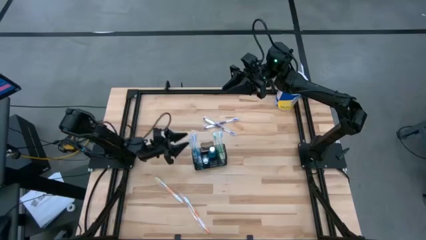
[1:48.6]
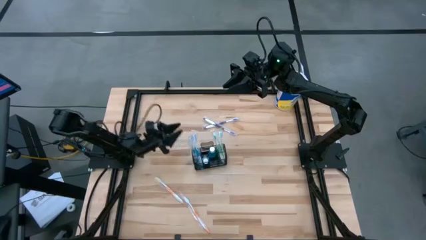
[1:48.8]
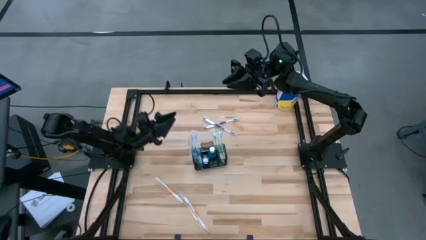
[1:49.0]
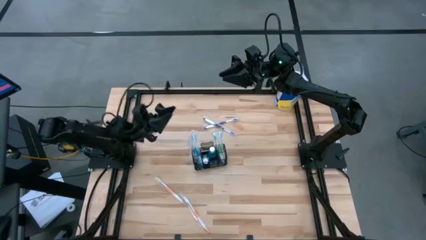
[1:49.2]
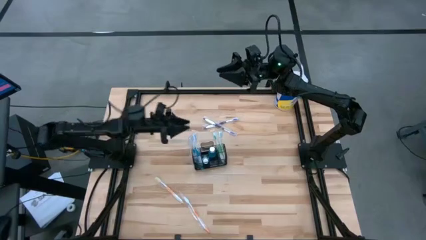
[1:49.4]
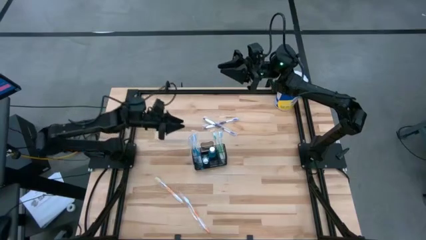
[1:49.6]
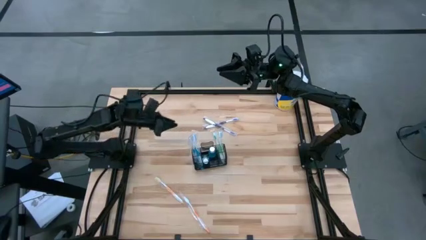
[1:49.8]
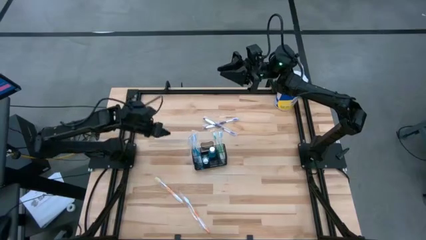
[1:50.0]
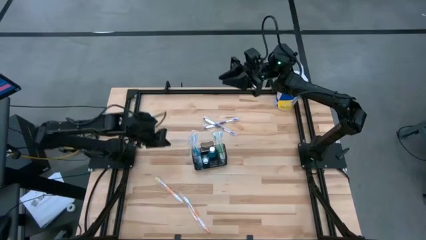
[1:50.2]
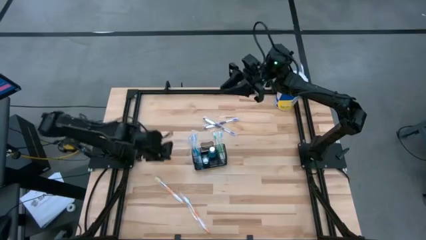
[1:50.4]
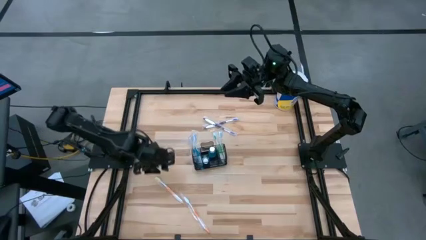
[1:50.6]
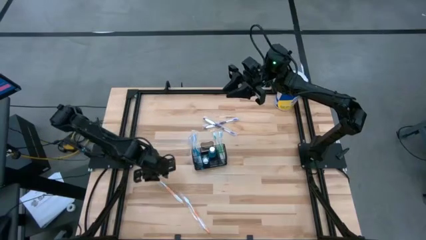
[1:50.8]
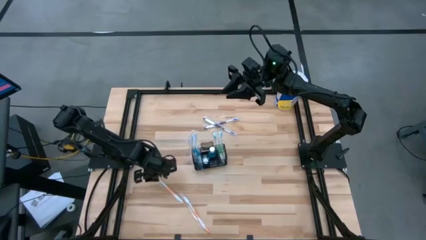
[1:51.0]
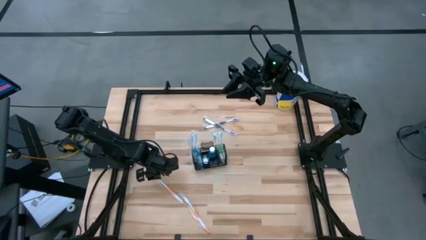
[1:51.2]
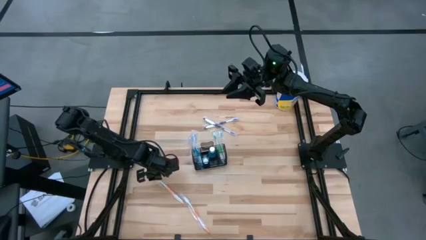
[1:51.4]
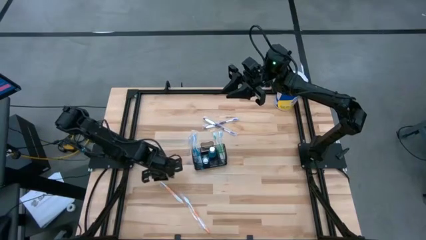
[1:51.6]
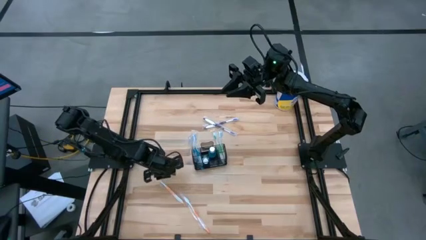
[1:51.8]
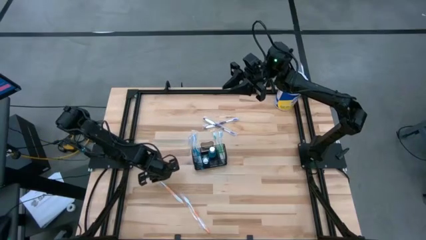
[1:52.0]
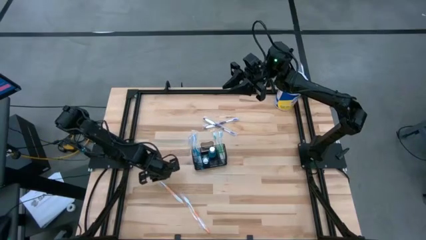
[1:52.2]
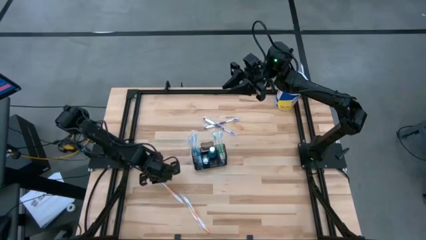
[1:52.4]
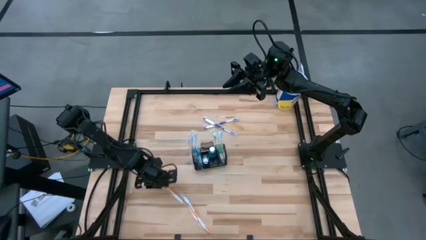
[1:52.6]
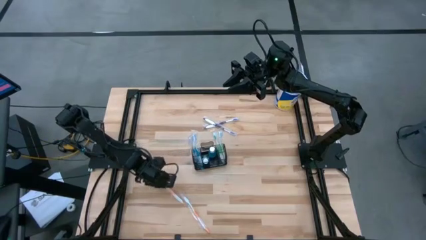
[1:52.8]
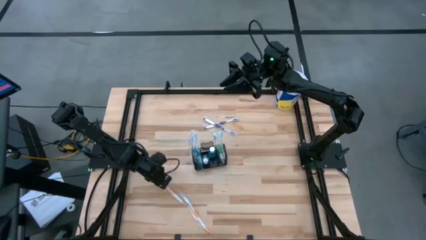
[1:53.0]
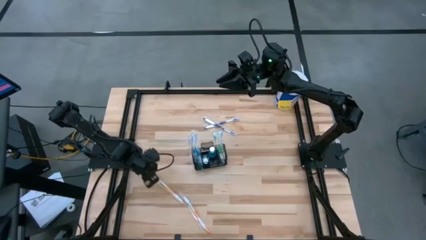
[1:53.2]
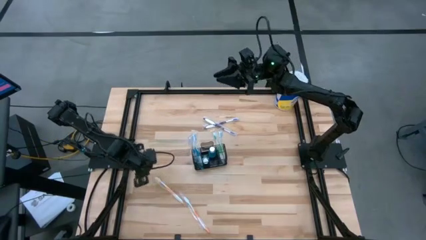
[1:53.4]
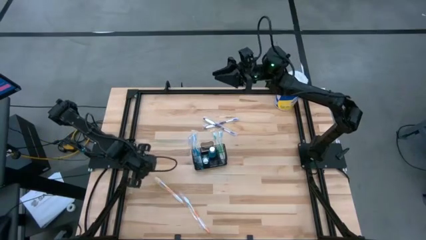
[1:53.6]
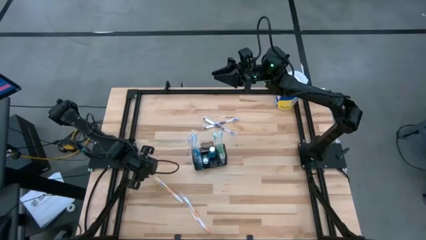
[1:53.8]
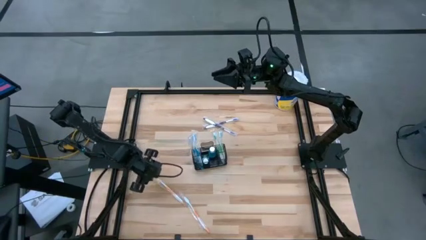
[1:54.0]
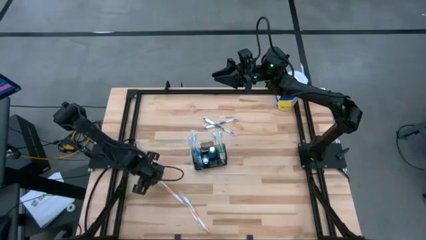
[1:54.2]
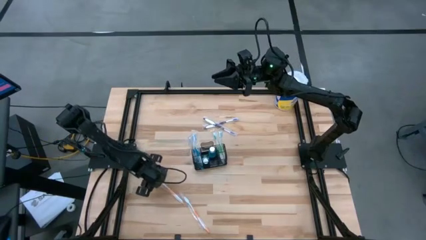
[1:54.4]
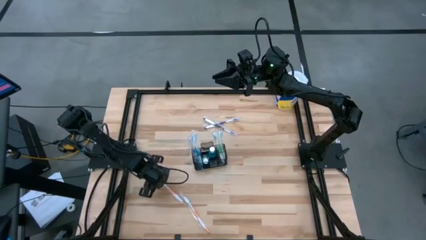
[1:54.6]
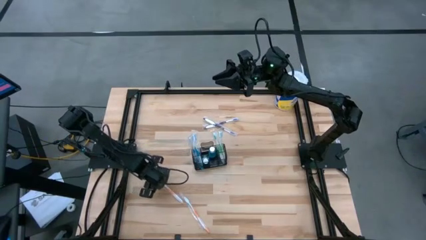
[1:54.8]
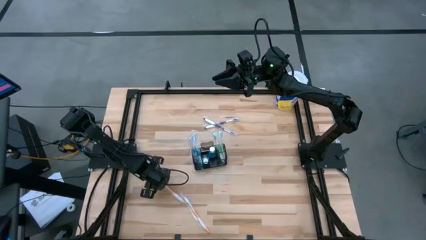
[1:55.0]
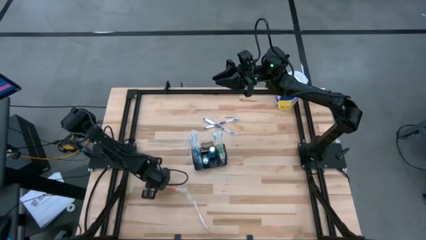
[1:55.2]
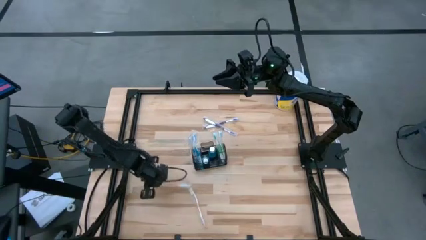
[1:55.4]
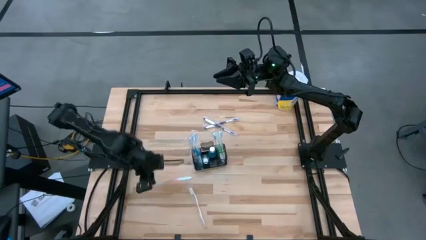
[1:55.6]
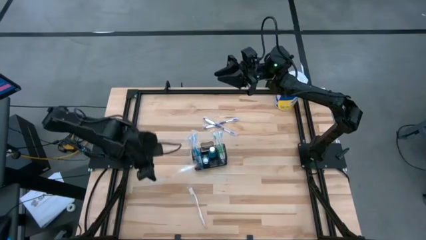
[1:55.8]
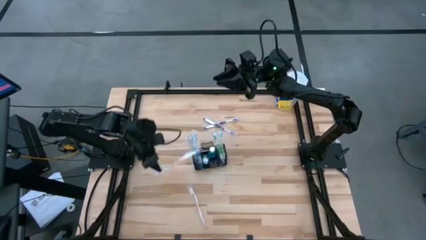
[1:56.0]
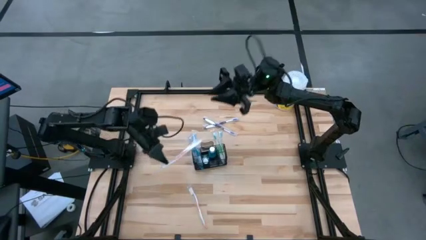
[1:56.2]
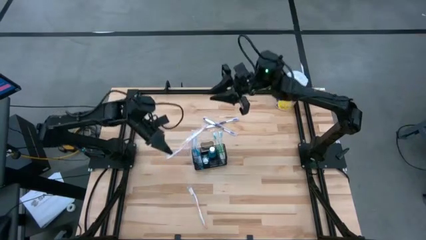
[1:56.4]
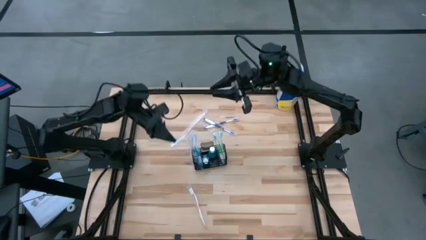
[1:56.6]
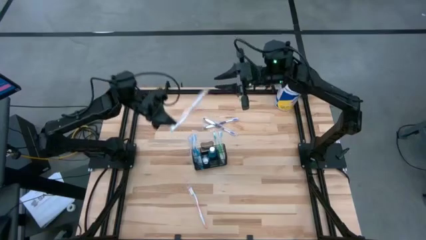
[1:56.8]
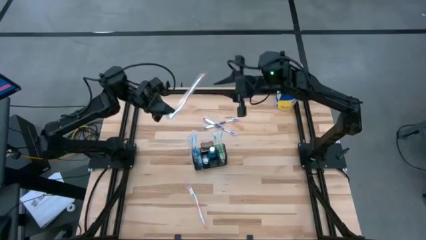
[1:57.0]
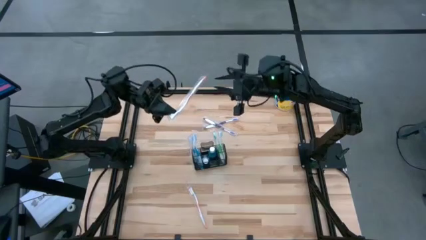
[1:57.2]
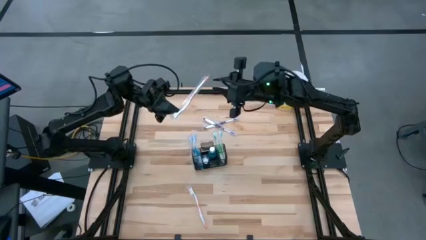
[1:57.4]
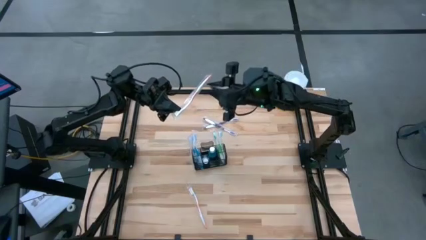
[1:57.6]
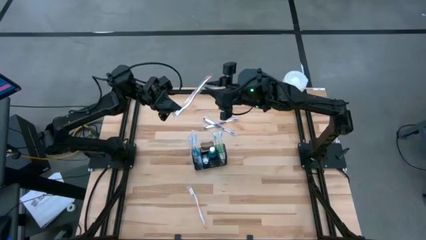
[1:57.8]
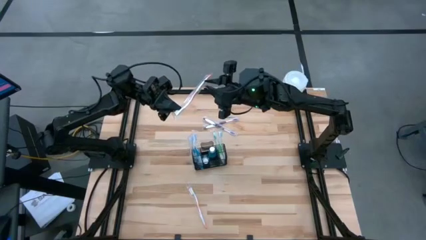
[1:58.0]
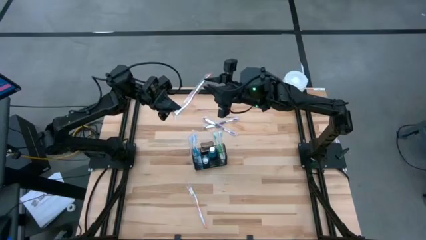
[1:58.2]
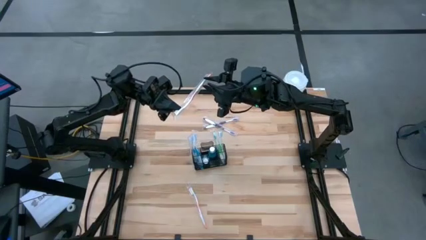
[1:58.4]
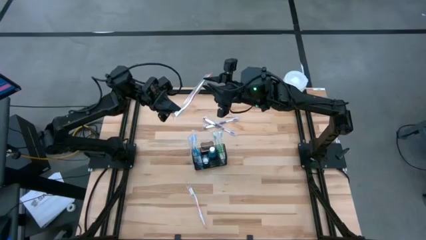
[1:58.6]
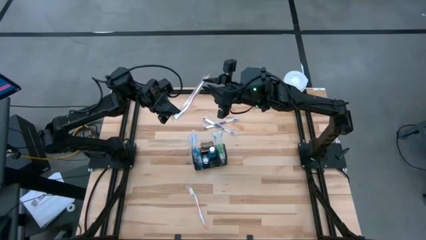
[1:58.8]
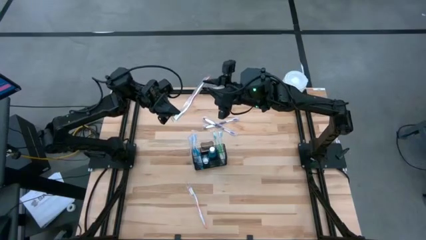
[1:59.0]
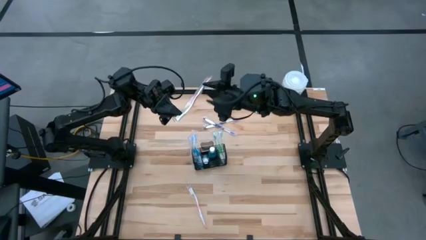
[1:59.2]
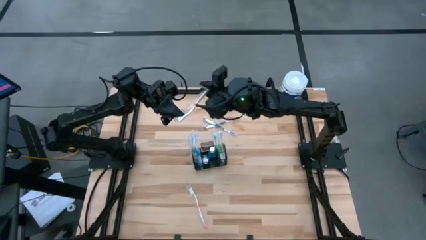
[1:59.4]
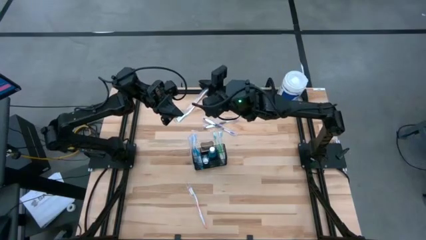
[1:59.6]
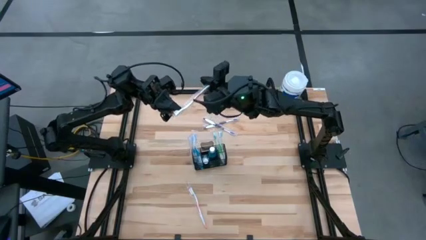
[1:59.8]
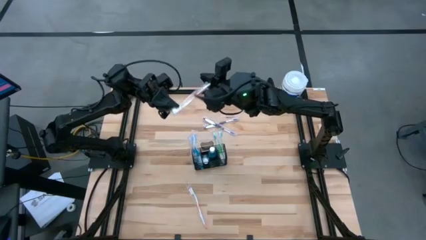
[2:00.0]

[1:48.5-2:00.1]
Task: Pick & Place toothbrushing station
Put the left orange toothbrush into the mesh organizer

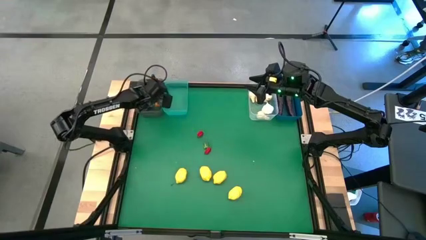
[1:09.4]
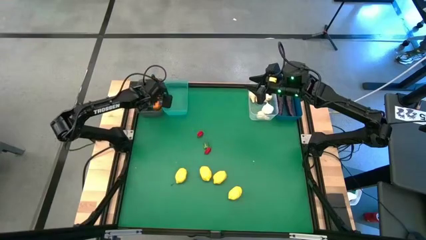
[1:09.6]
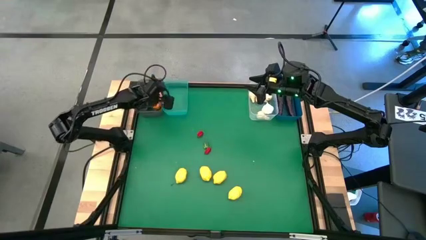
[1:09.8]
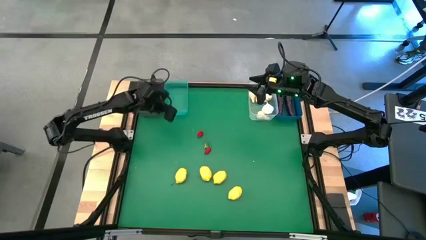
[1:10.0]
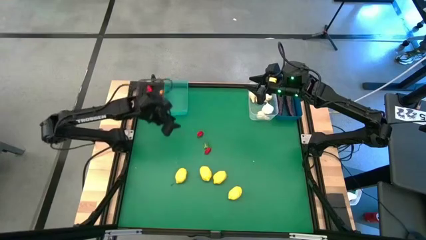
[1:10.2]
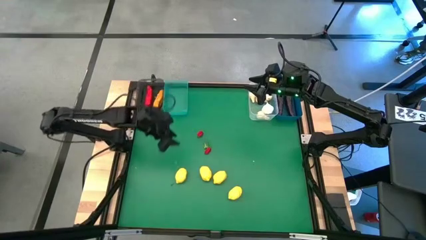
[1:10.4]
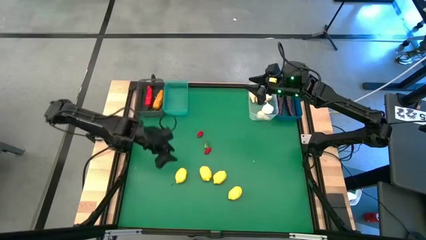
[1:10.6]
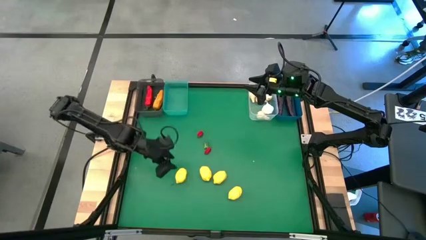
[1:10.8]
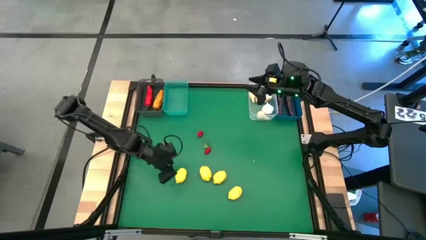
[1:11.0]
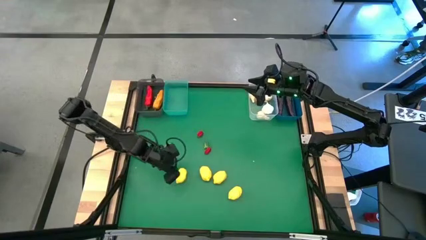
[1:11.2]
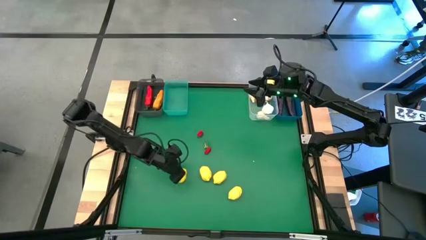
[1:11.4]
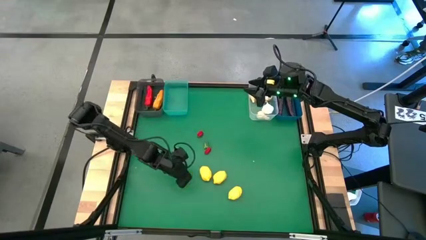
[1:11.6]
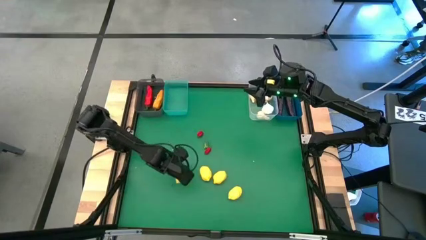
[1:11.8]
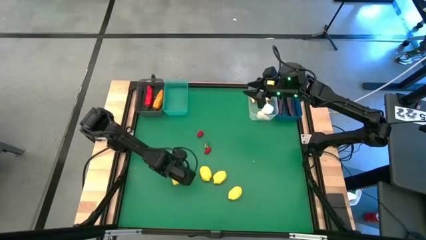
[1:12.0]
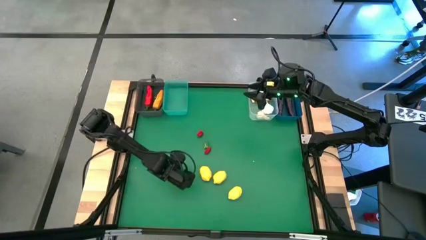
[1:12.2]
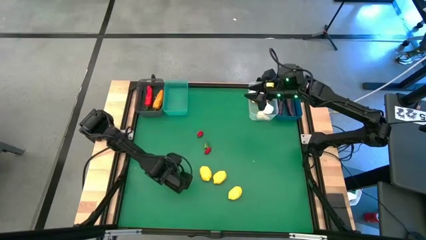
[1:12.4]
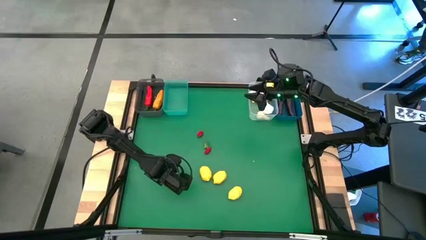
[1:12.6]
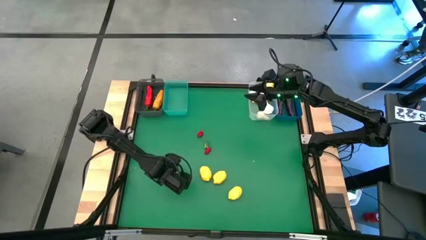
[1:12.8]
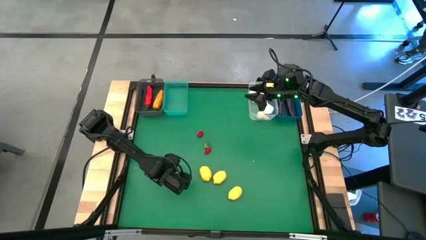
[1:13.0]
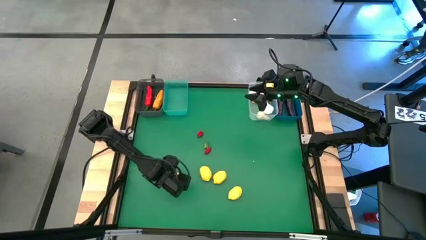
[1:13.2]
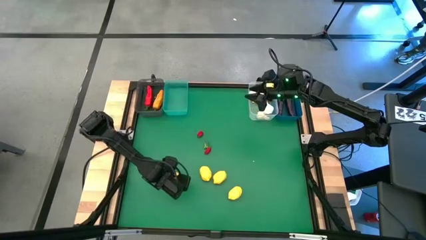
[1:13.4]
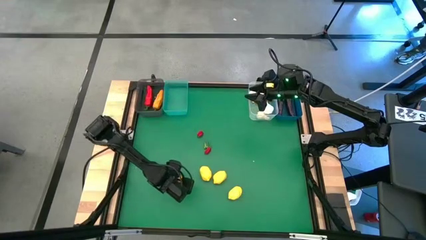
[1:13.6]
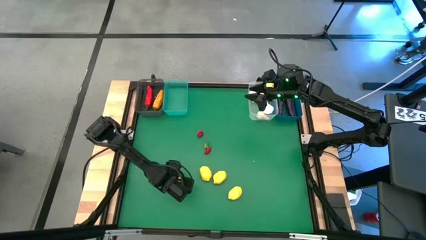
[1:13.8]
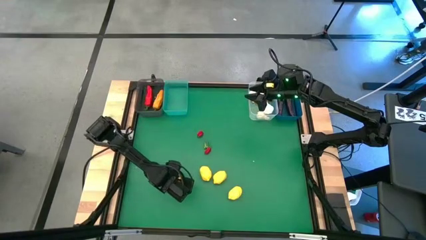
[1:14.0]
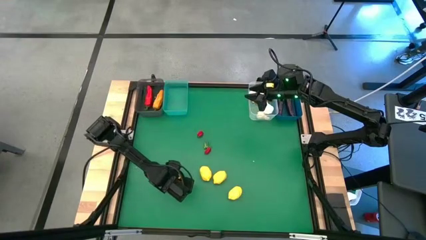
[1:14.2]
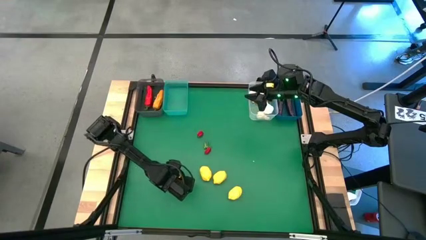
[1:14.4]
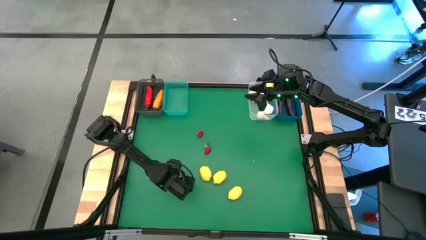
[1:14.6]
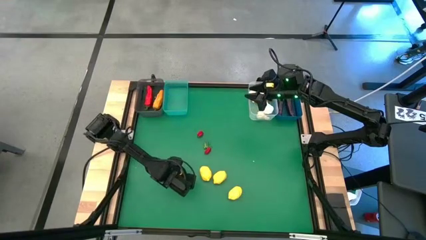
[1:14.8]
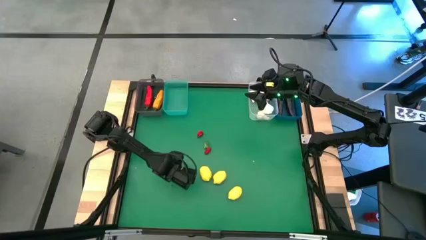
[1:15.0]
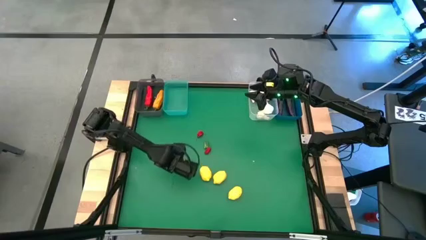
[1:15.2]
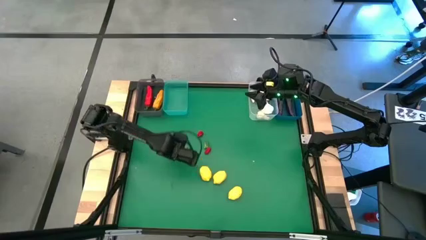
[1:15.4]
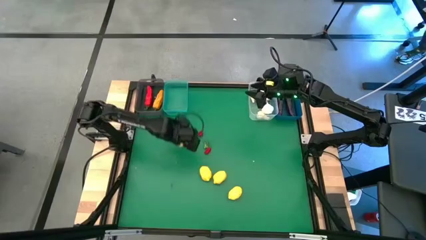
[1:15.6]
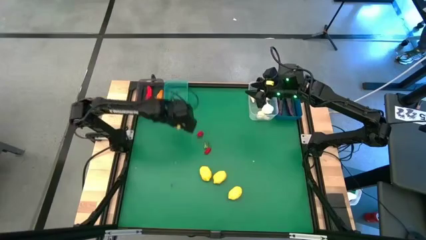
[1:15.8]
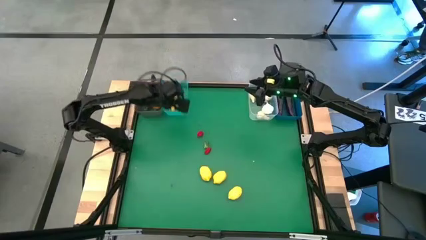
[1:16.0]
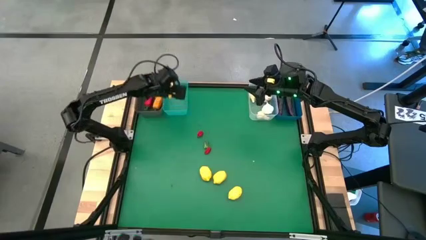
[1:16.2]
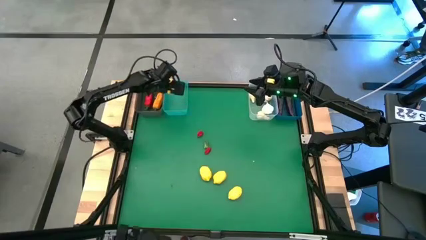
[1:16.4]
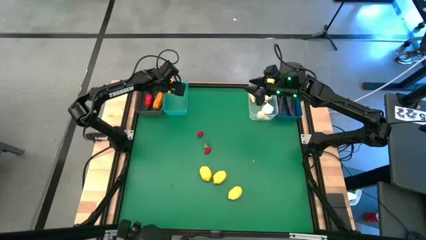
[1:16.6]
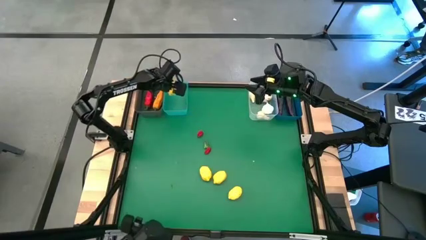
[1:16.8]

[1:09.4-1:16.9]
Task: Sort produce into baskets
Put the left lemon into the transparent light blue bin
